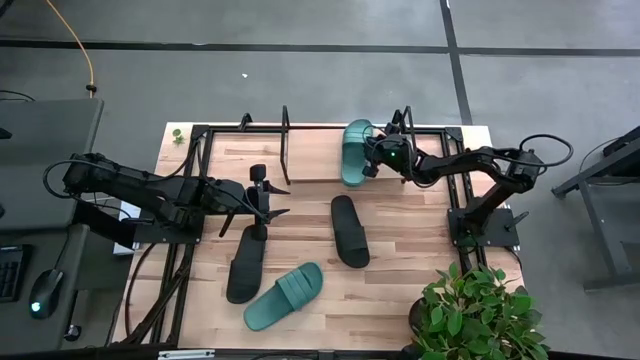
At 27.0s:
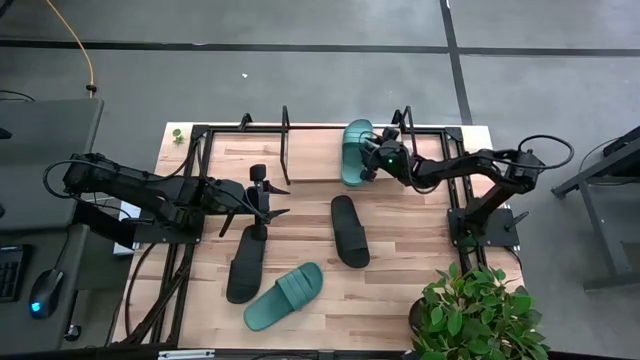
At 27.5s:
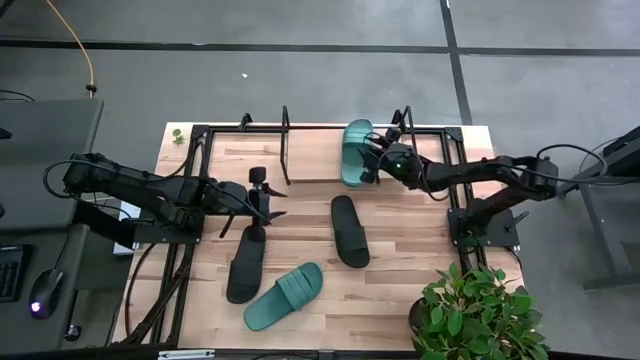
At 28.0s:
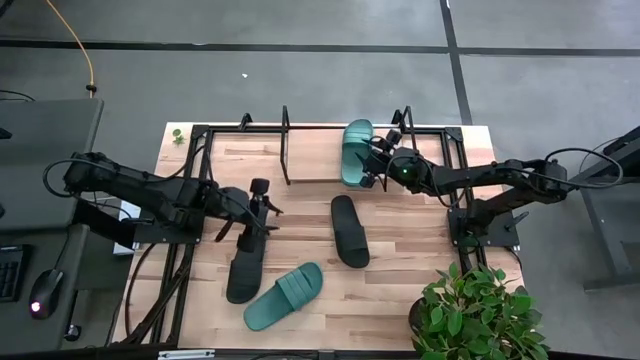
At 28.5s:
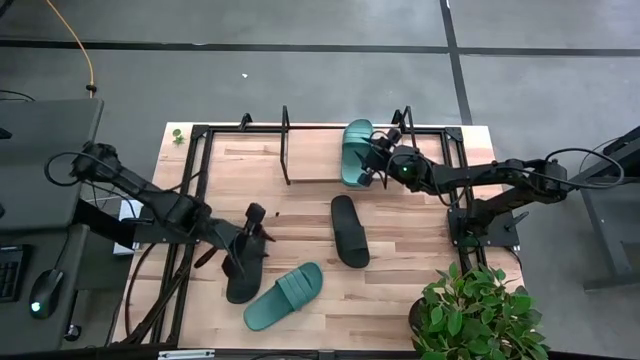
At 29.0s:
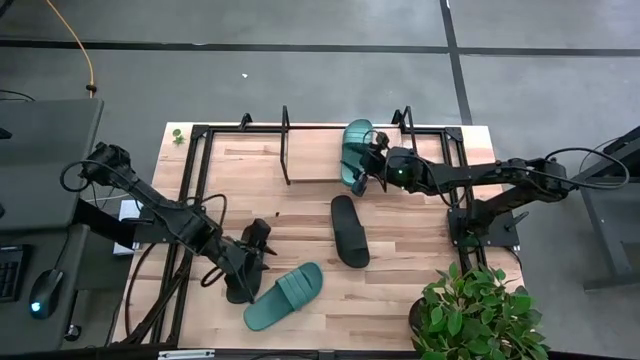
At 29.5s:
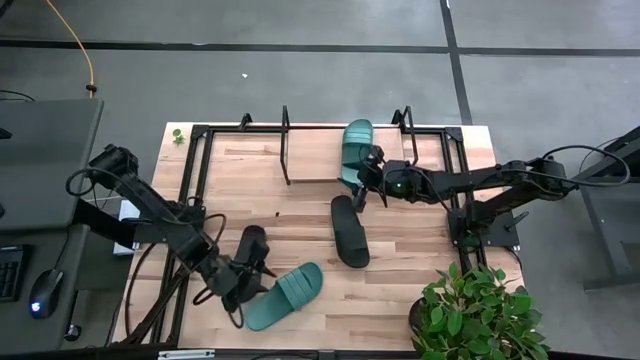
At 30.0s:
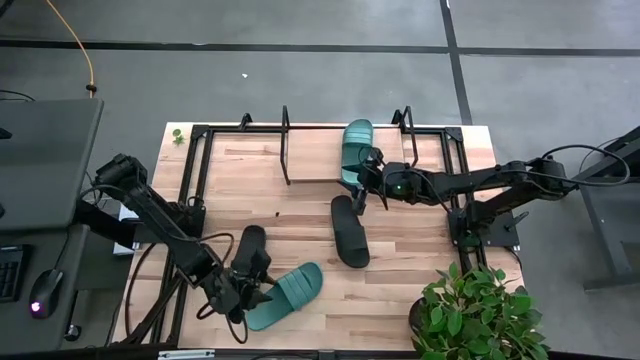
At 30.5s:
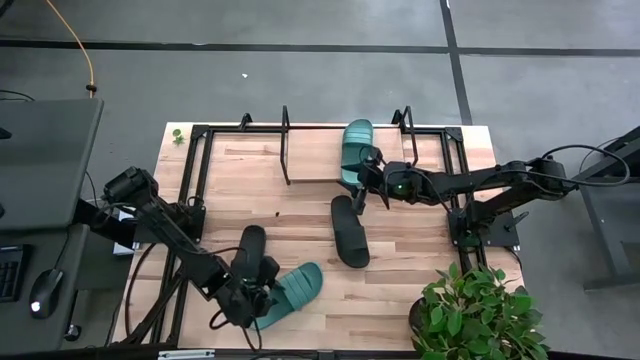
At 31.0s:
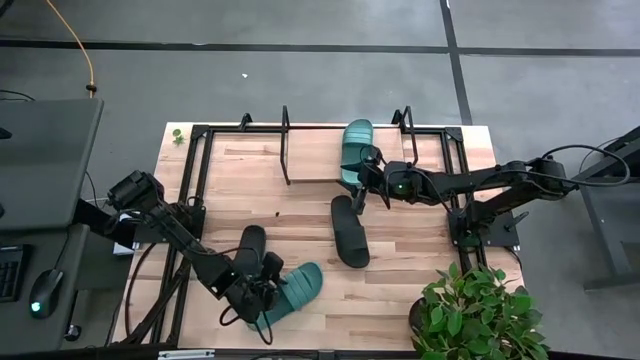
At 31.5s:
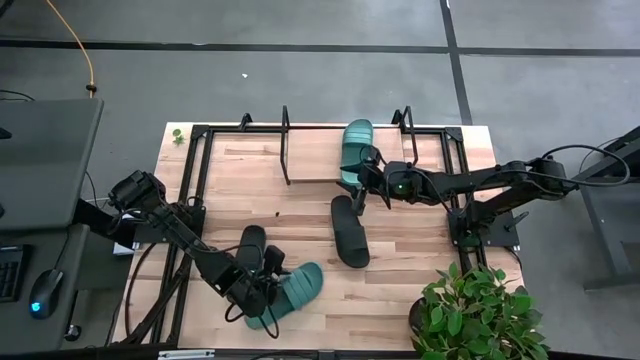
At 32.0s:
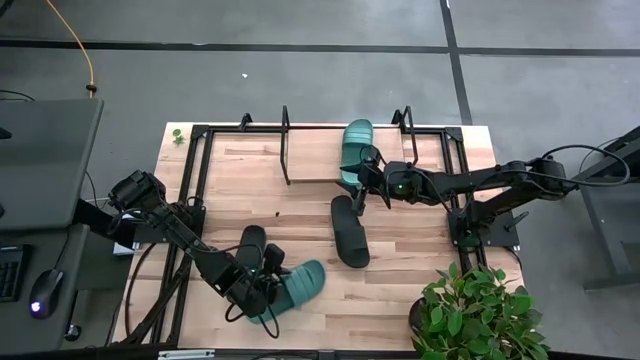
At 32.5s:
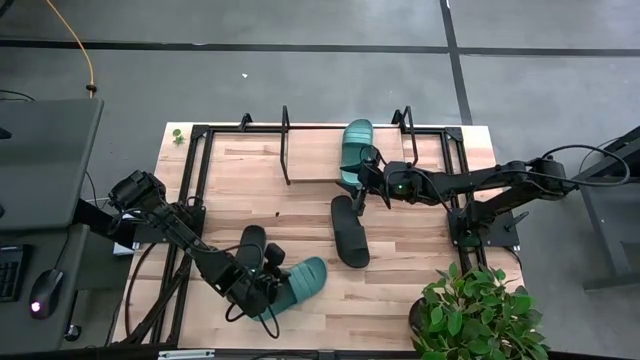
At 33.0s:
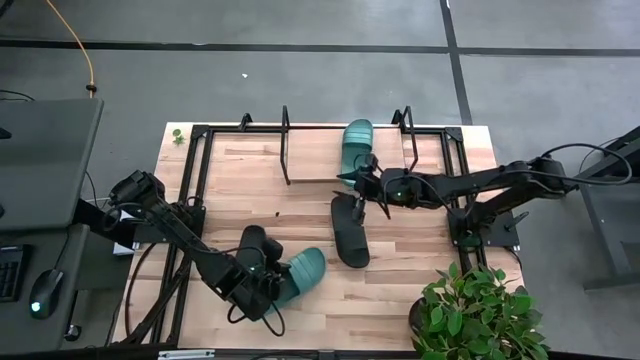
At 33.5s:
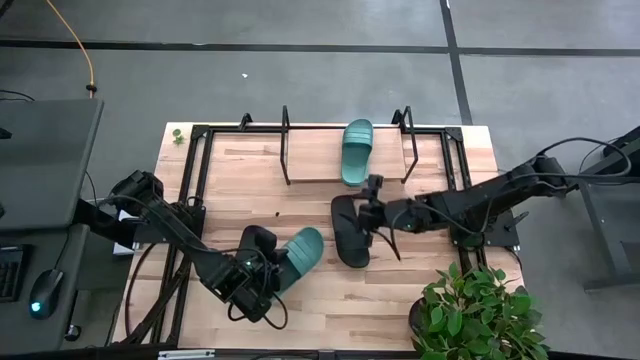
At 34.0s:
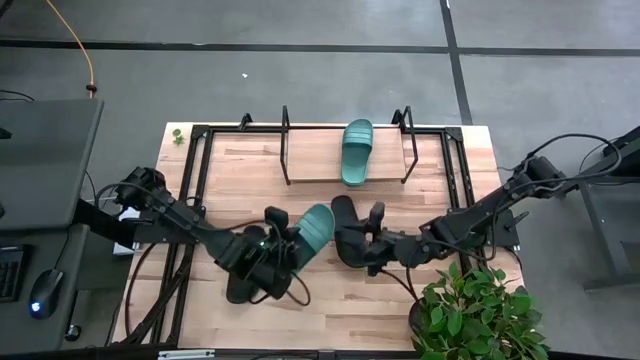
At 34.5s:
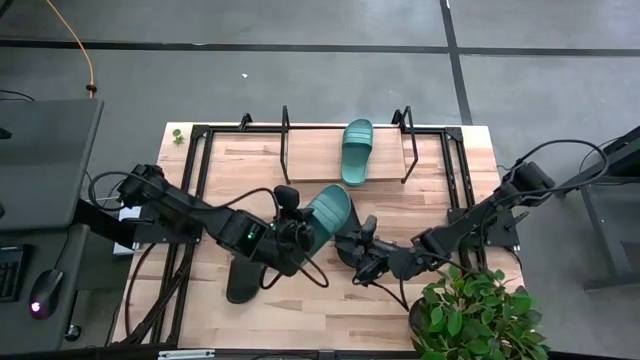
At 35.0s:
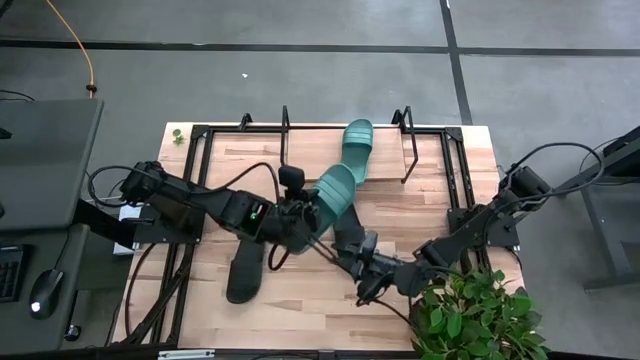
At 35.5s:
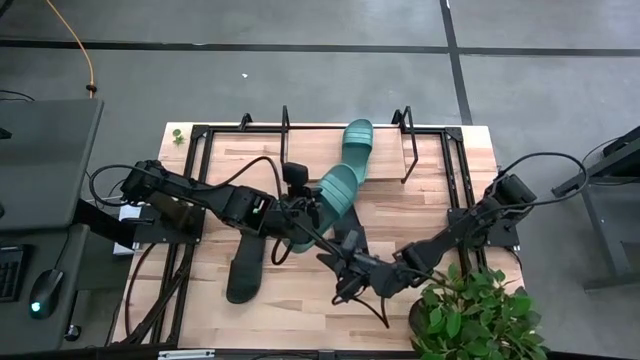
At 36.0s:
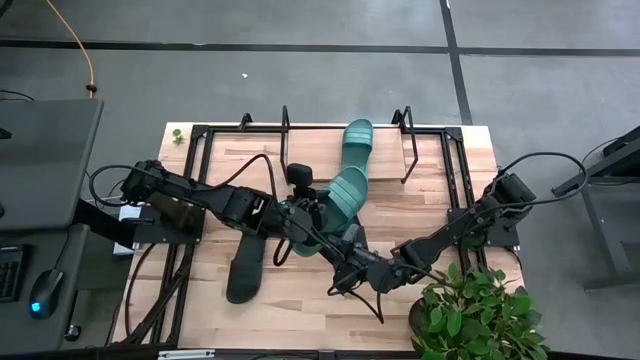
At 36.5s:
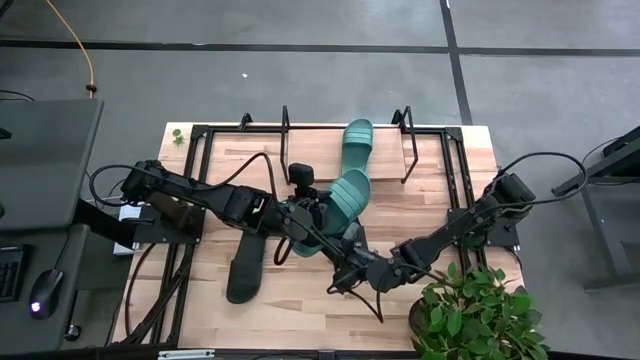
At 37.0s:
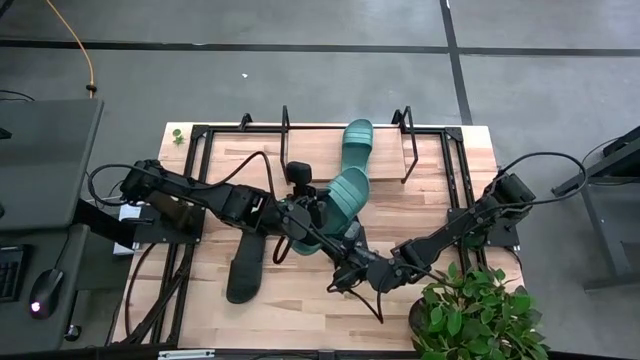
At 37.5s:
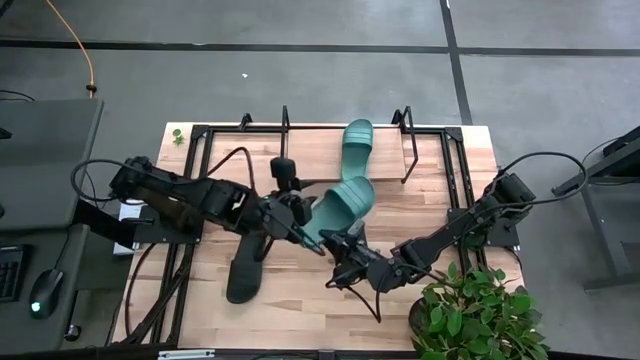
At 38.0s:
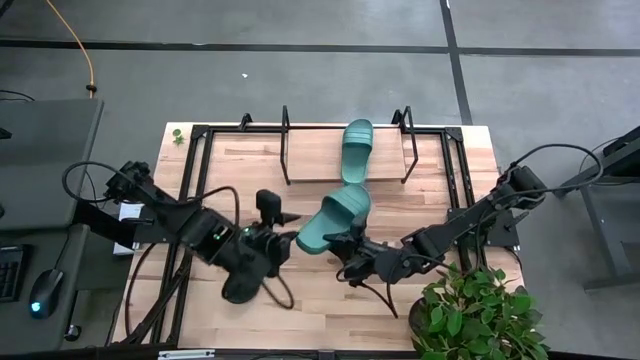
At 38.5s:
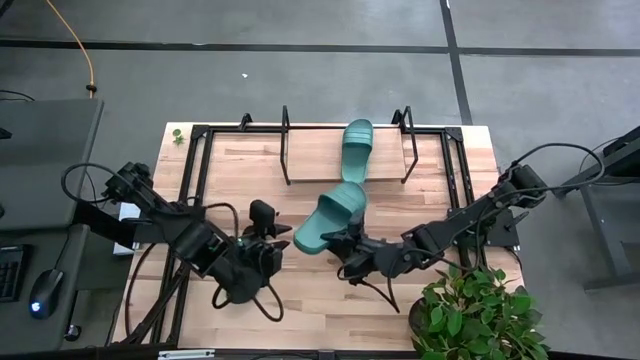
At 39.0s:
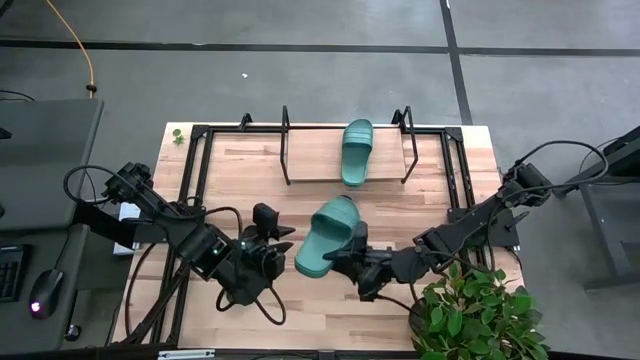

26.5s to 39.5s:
Task: Pick and place slides into the shelf
Put the green slide on the shelf

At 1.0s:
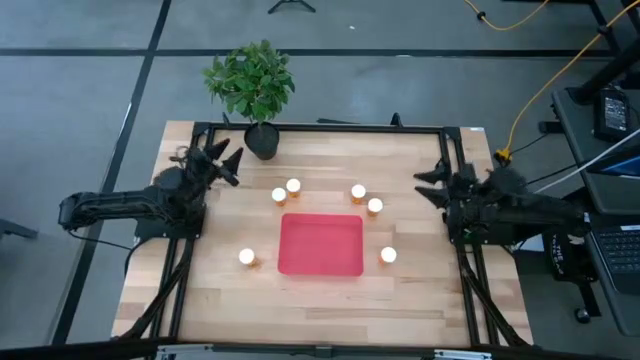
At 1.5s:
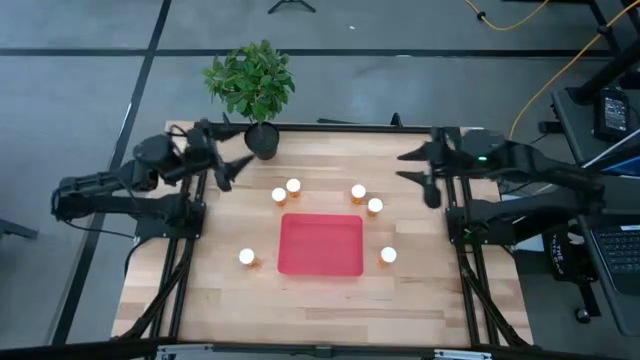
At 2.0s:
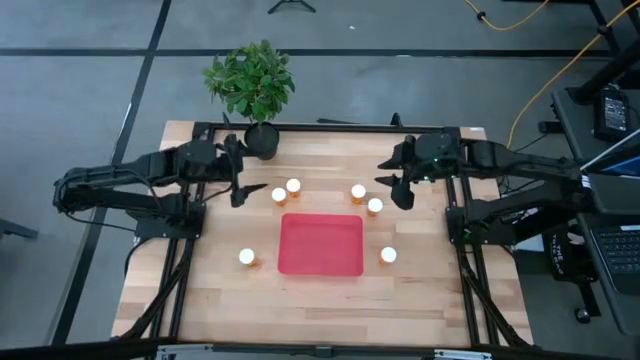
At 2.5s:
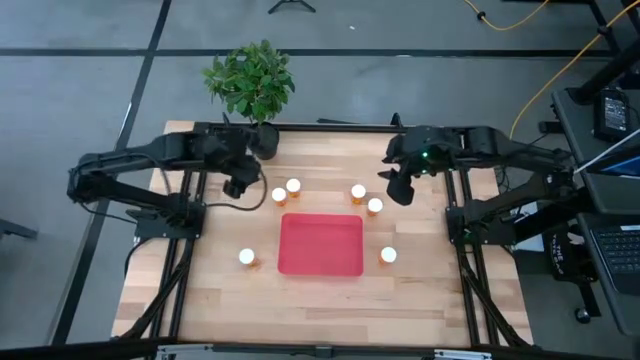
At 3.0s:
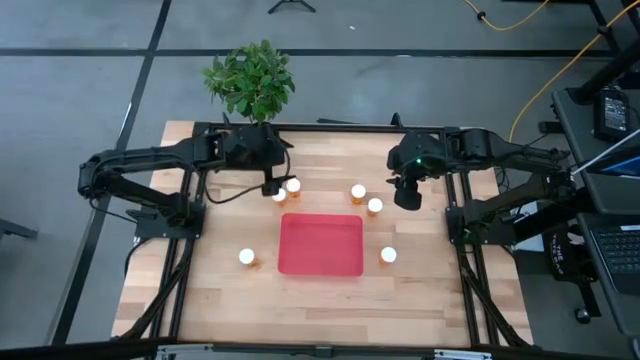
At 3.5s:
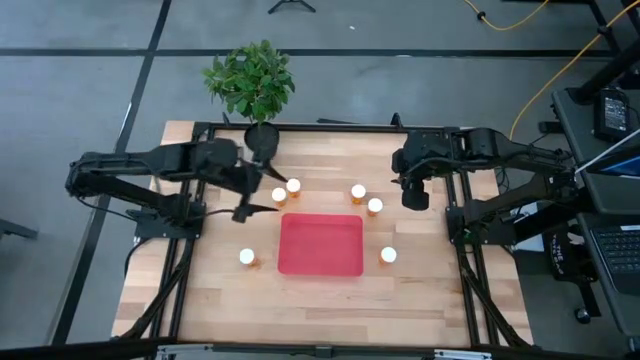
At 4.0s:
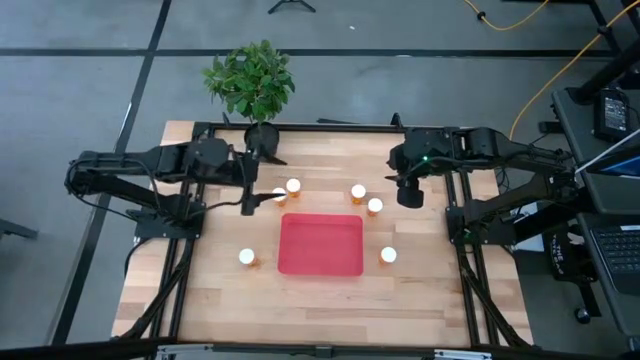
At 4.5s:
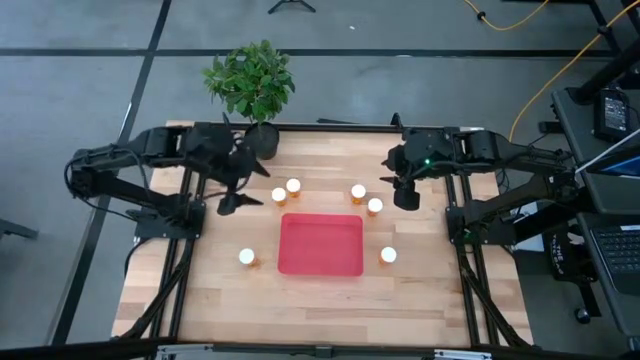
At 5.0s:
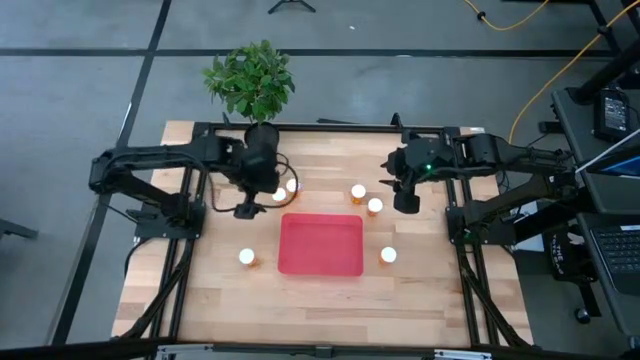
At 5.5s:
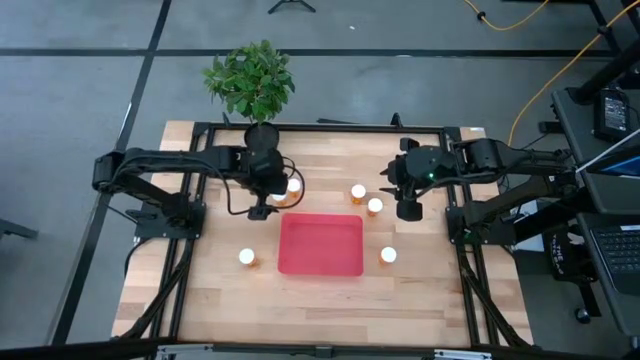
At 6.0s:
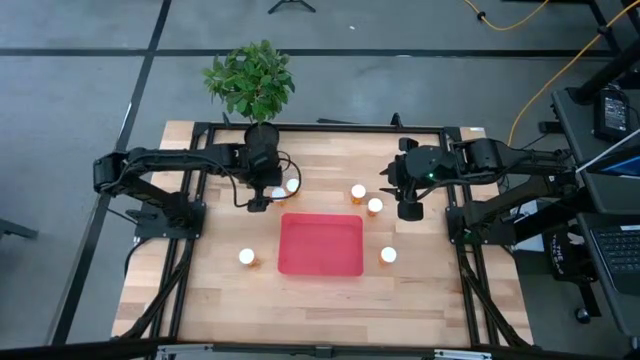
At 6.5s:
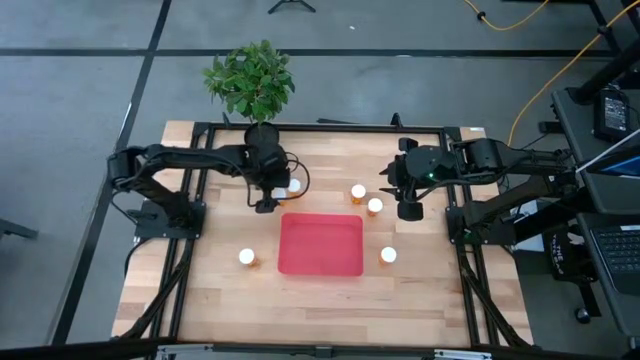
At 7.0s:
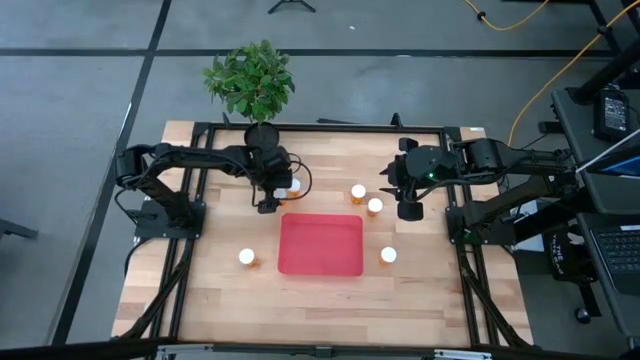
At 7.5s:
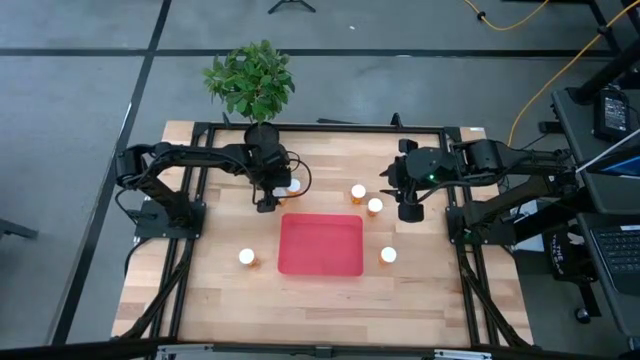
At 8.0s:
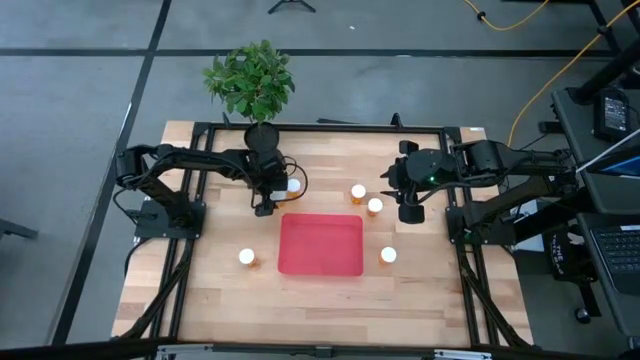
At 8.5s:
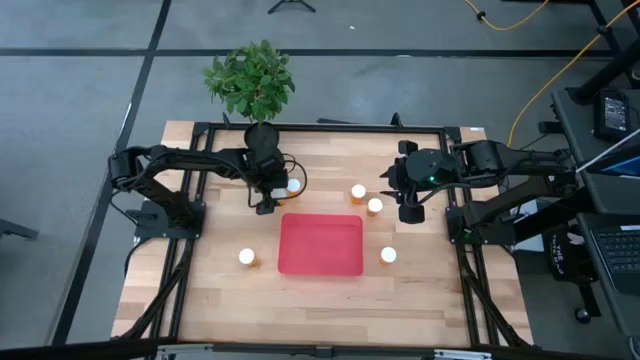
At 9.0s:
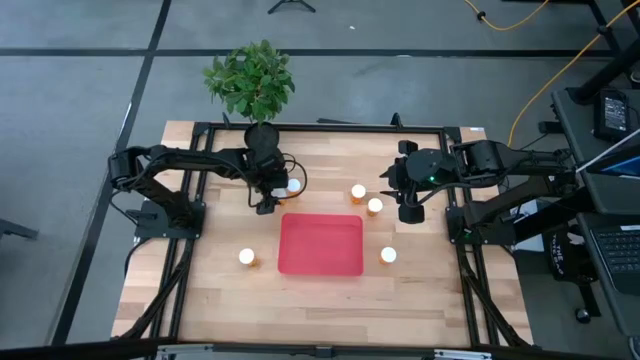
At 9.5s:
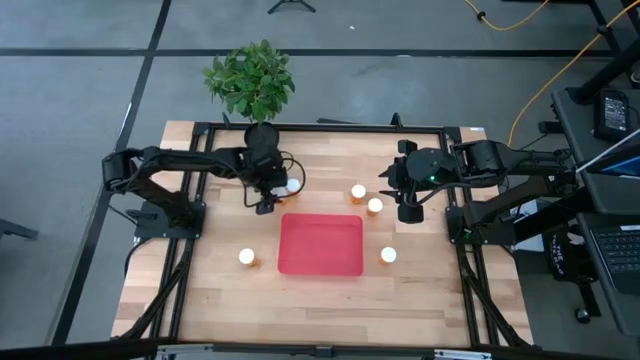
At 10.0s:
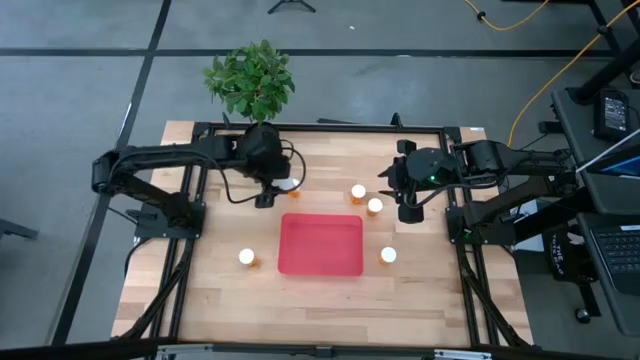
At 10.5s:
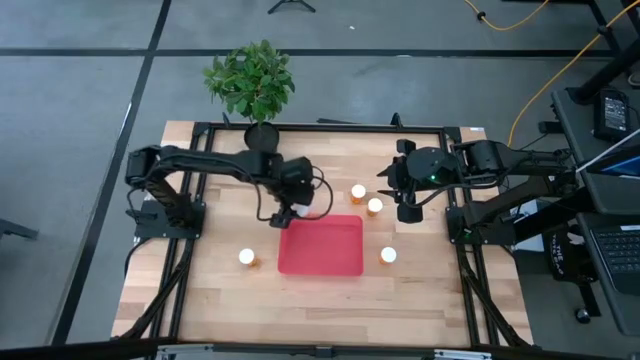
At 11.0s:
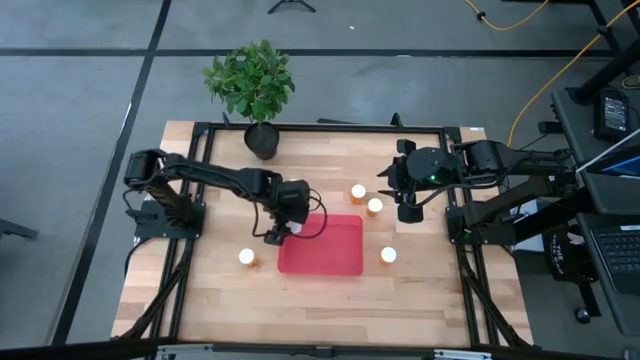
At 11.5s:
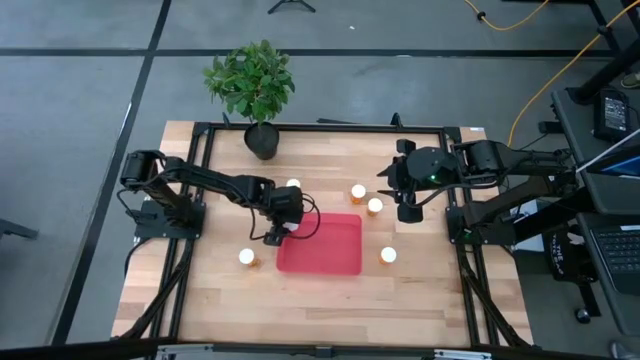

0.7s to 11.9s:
Task: Pick and place pill bottles into a basket
Put the orange pill bottle into the bin
